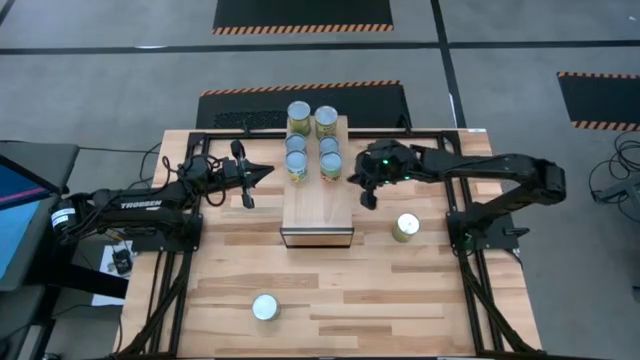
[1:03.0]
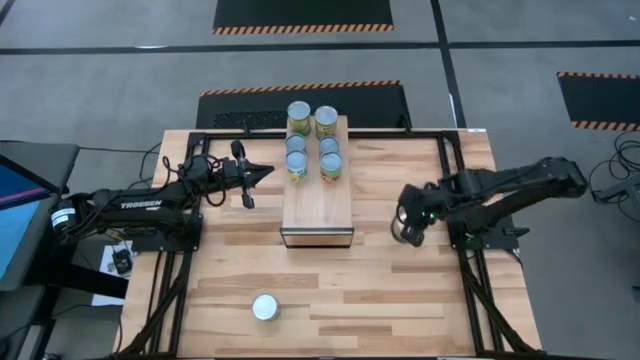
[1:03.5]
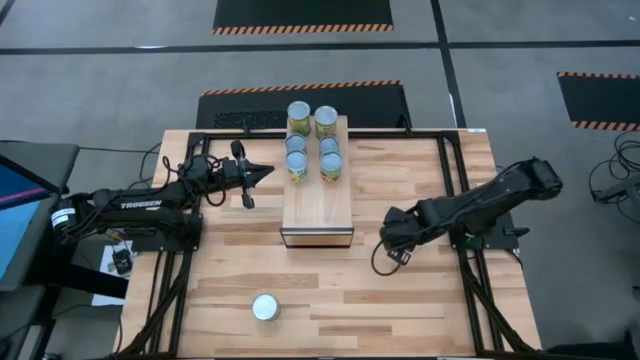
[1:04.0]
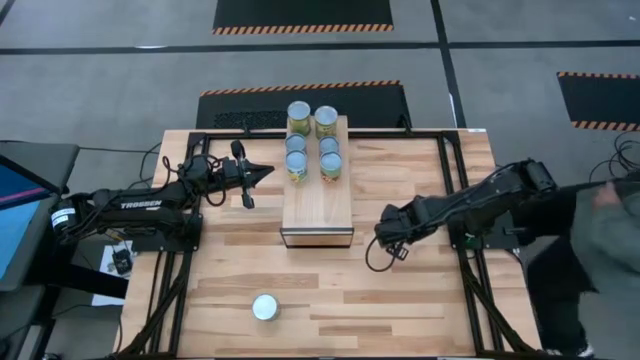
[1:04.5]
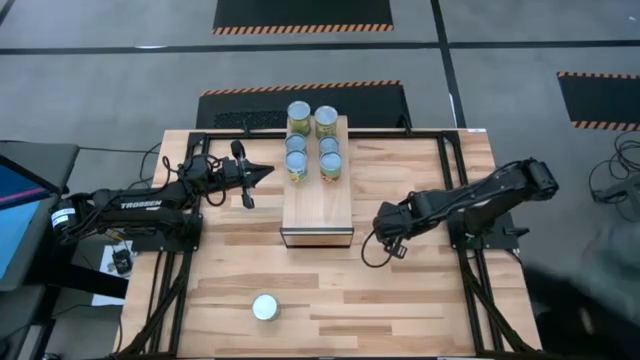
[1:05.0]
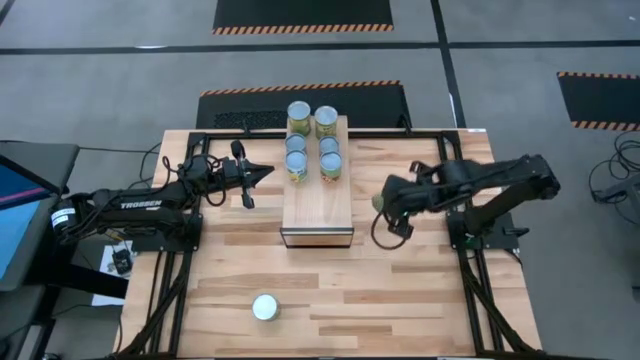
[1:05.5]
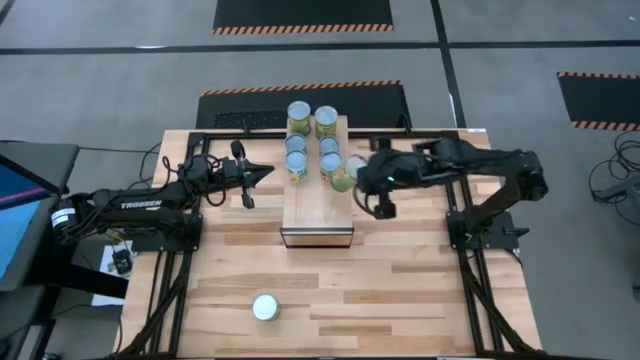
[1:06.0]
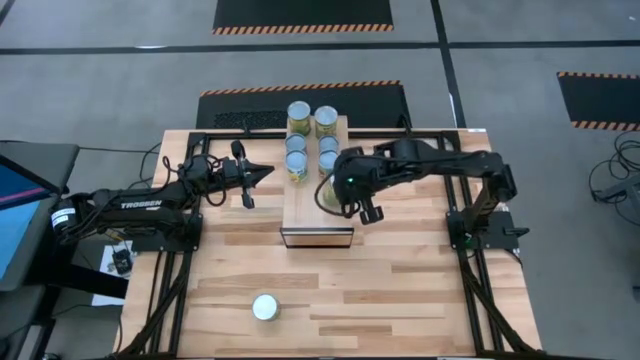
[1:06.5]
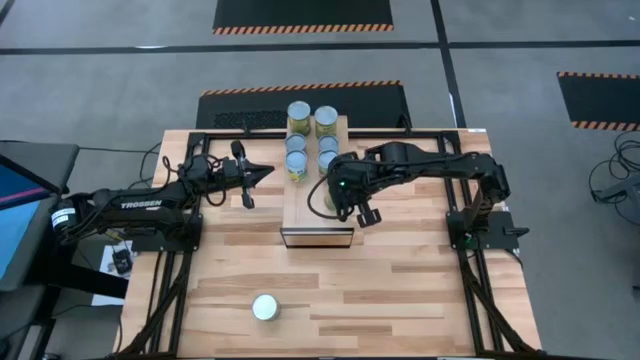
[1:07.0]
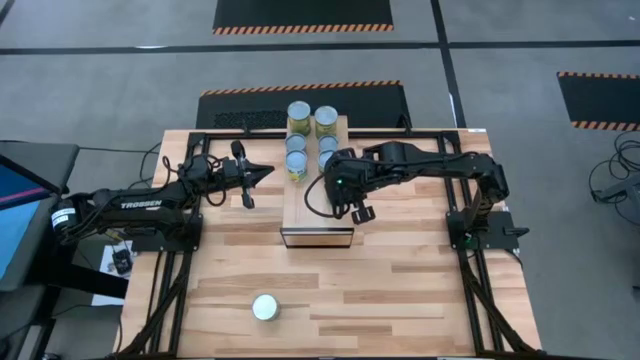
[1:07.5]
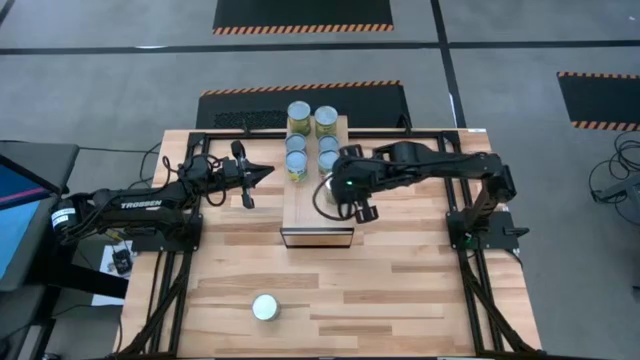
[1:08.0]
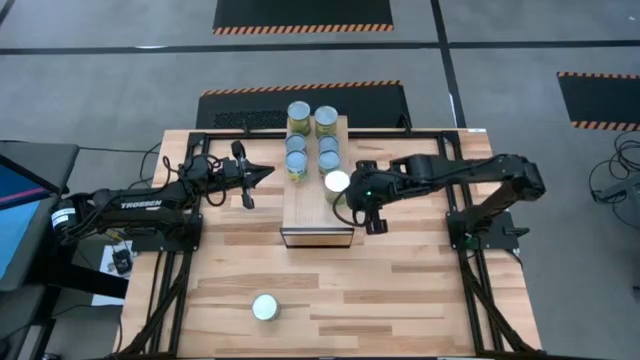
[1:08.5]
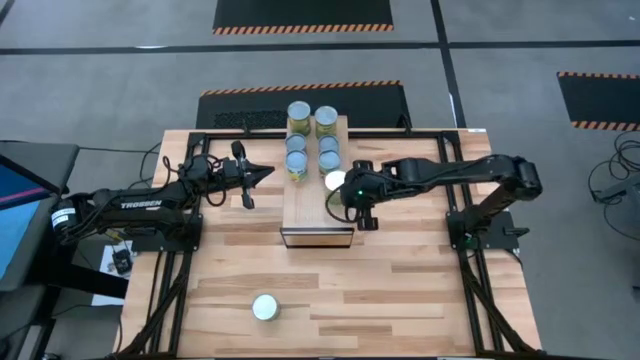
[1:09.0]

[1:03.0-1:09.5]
Task: Pick and place cans onto a shelf
Put the top large canned oranges on the shelf

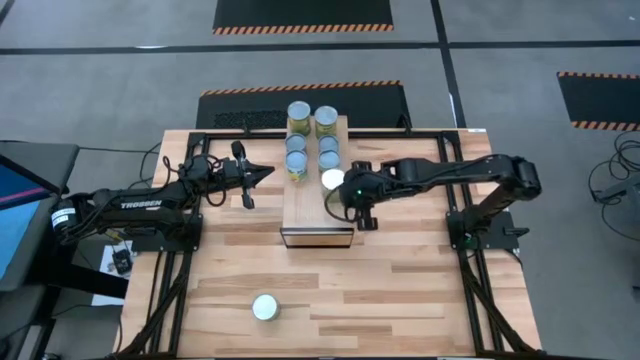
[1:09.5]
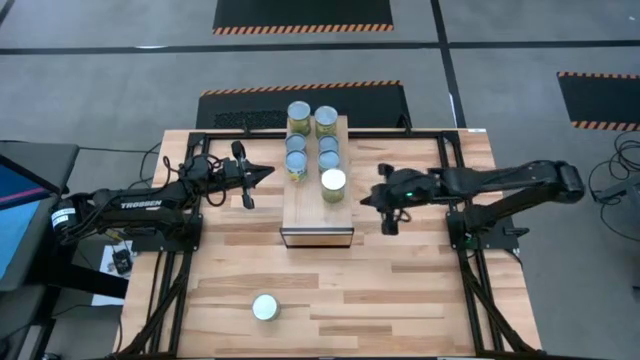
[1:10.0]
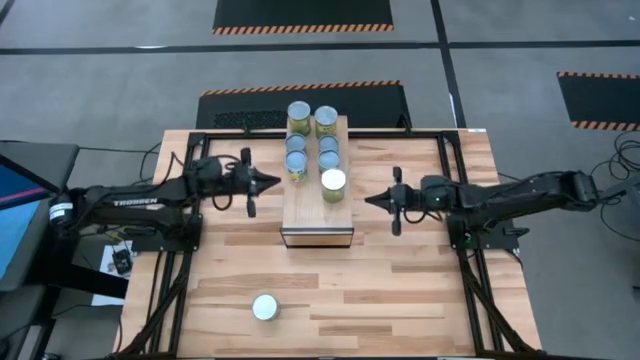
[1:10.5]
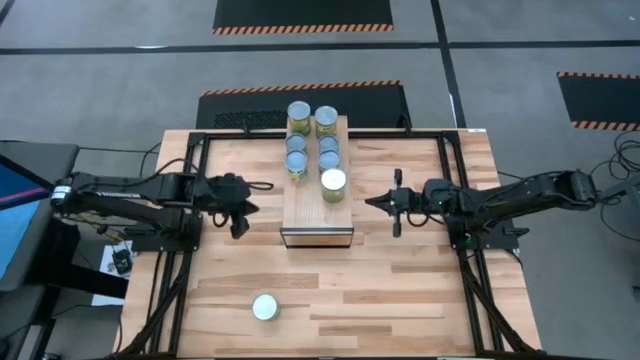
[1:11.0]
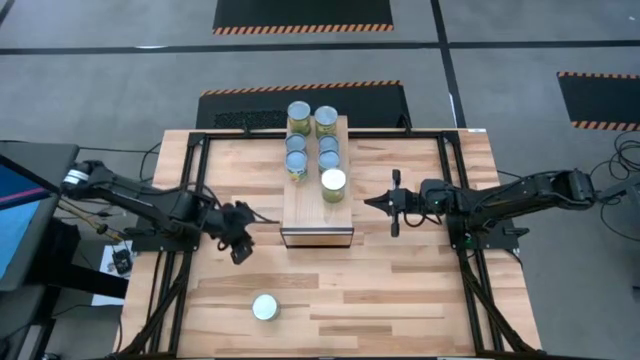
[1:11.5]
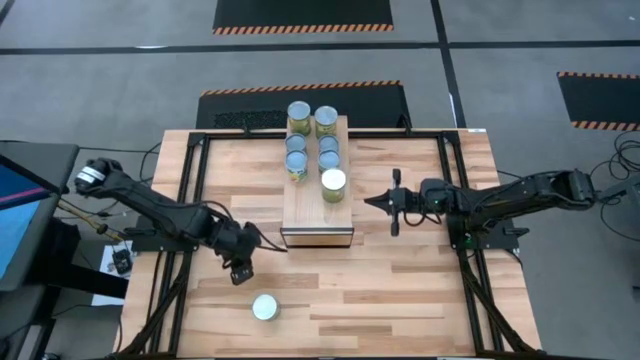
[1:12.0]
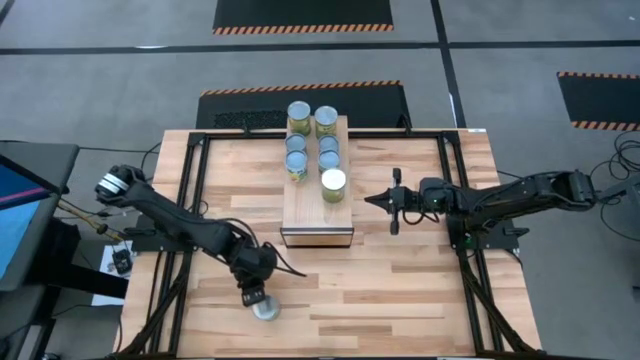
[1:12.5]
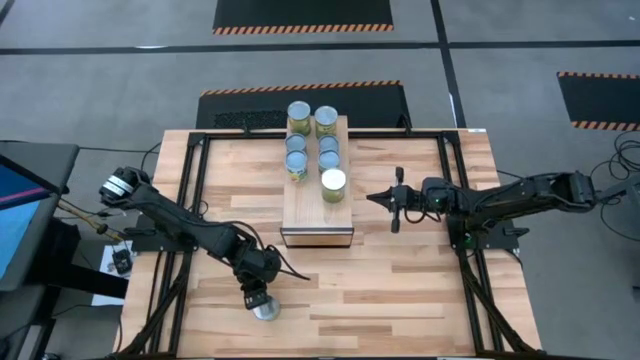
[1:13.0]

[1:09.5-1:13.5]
Put the large canned oranges aligned with the other large canned oranges on the shelf

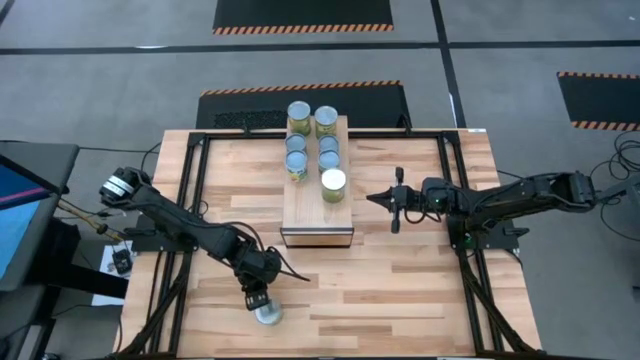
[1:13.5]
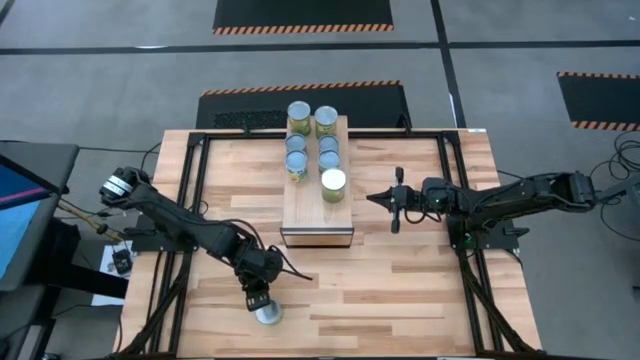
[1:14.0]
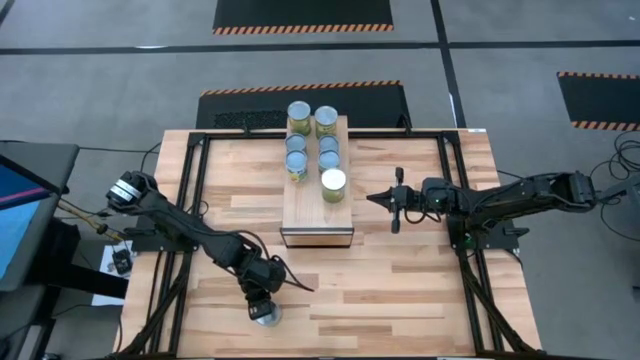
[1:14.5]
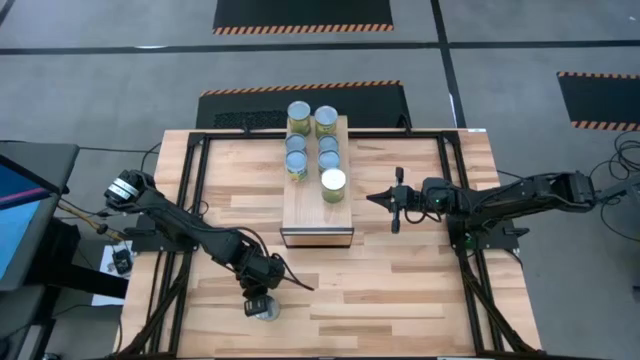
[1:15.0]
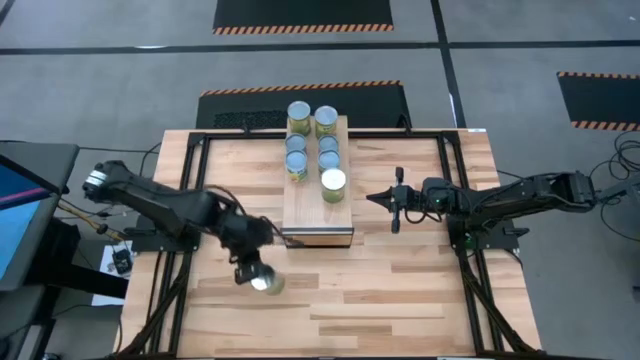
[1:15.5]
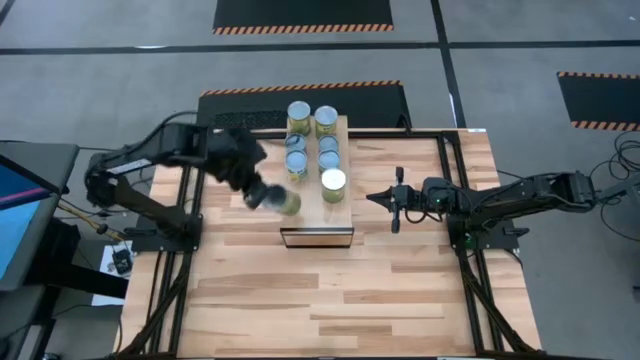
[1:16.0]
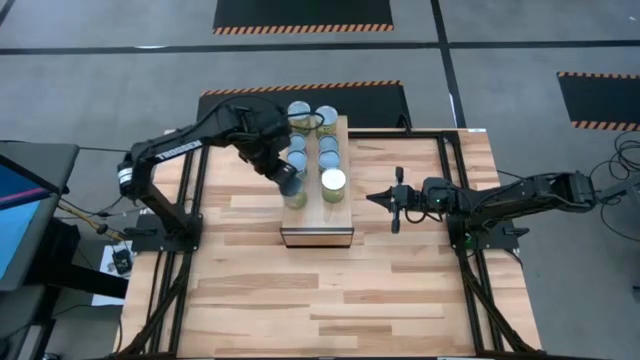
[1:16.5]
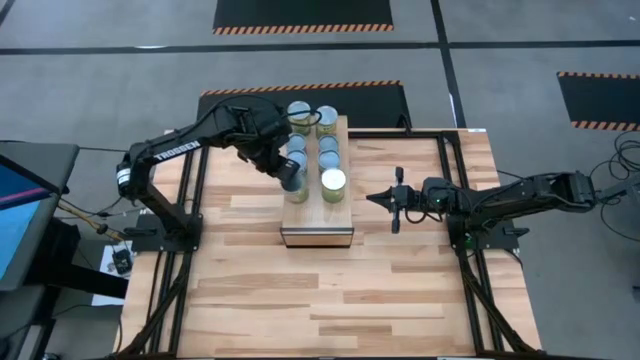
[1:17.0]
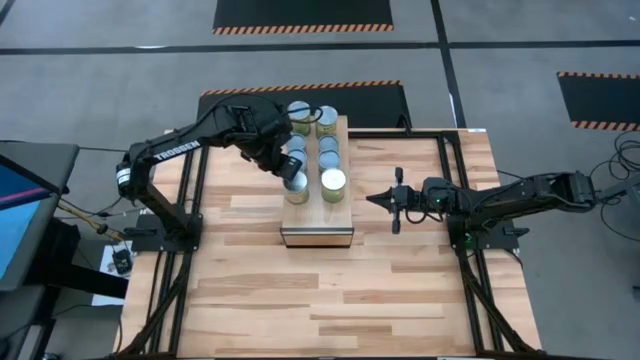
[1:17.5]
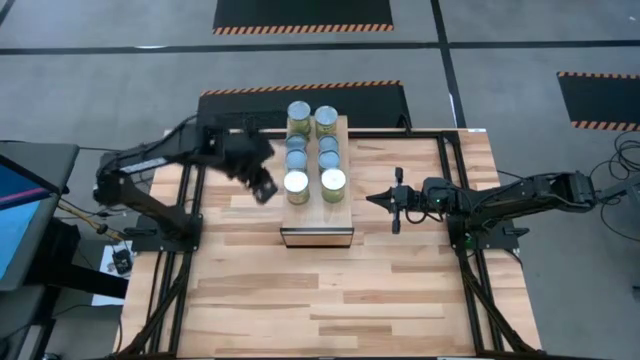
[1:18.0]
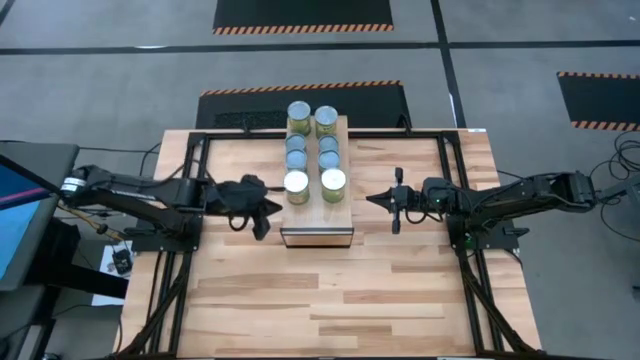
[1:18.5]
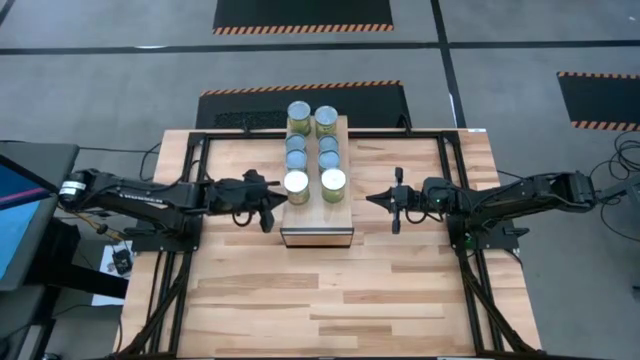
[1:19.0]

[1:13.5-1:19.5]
Put the large canned oranges aligned with the other large canned oranges on the shelf

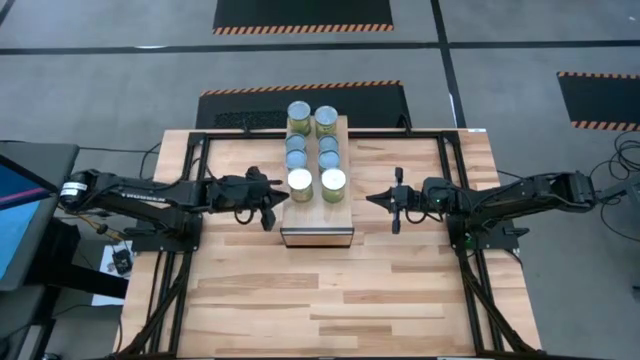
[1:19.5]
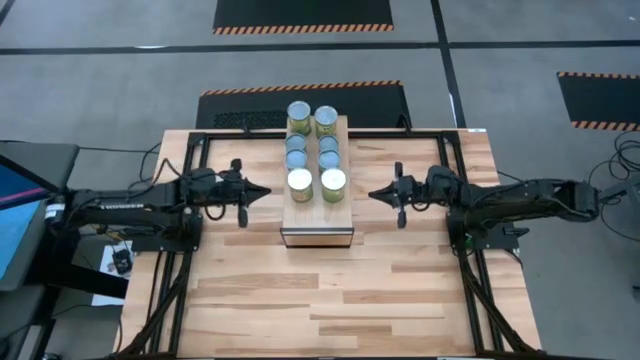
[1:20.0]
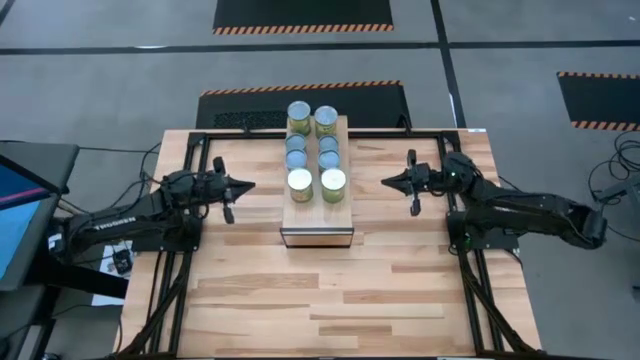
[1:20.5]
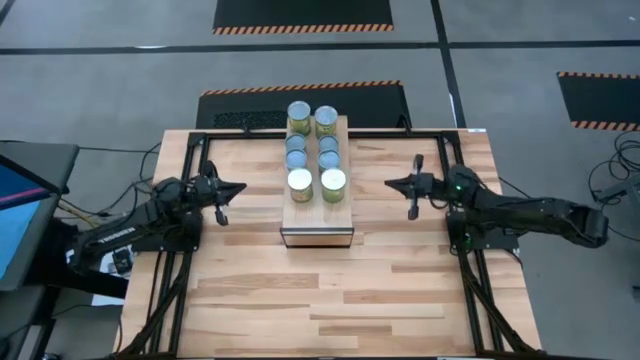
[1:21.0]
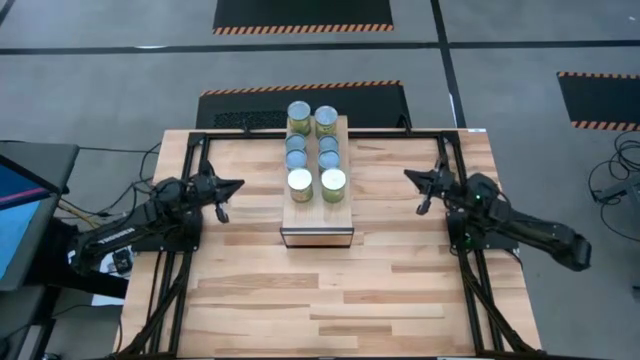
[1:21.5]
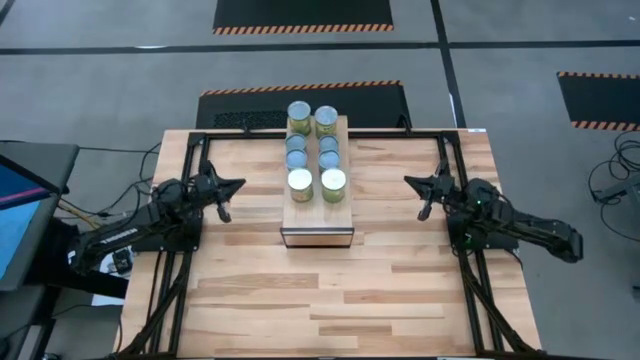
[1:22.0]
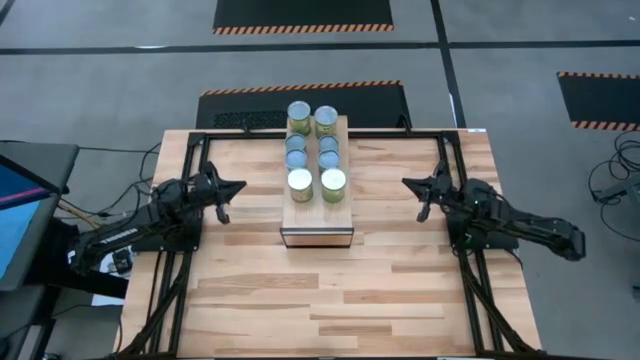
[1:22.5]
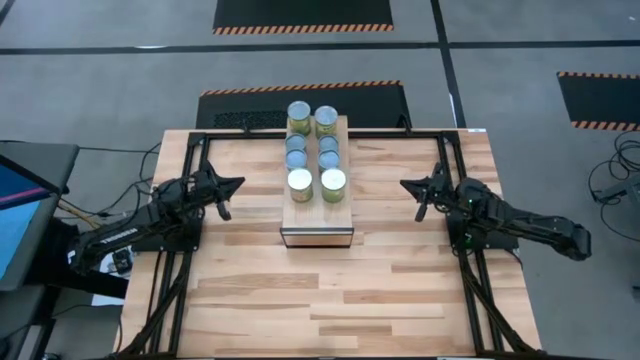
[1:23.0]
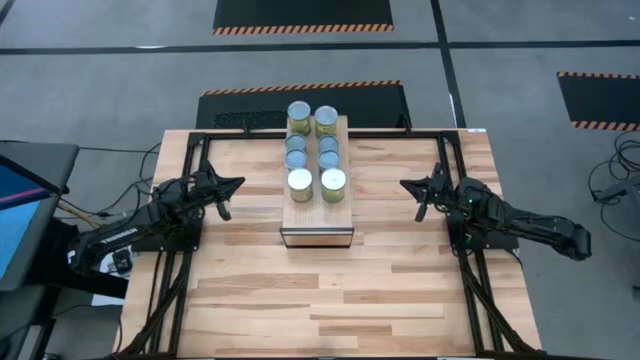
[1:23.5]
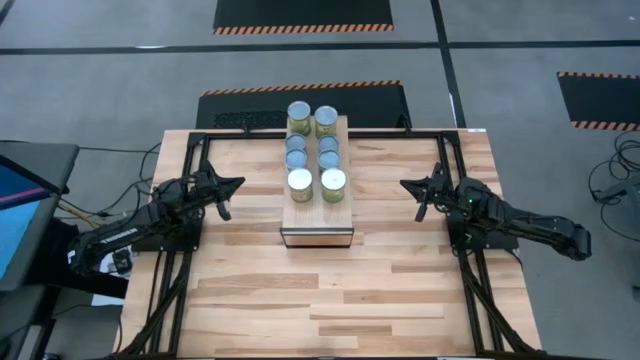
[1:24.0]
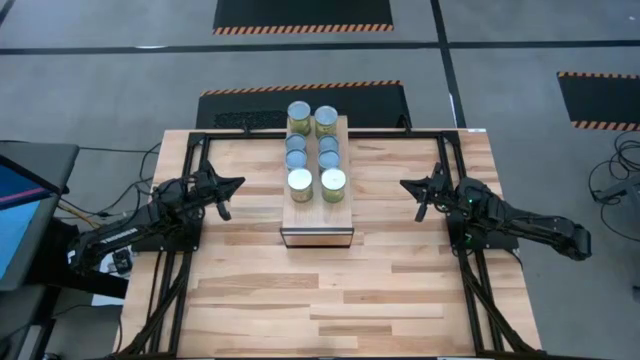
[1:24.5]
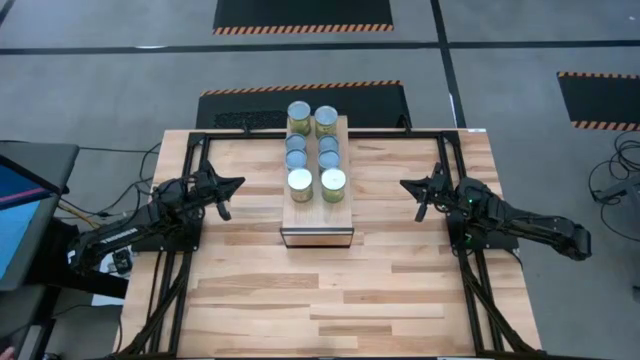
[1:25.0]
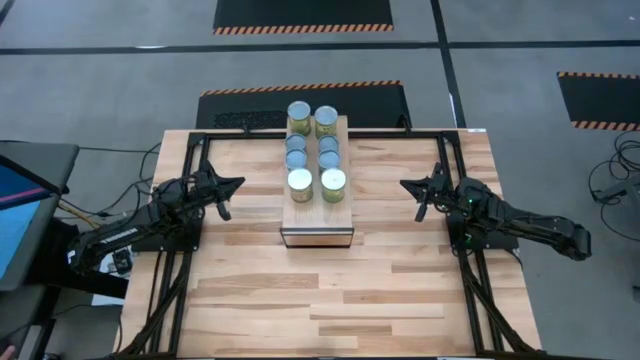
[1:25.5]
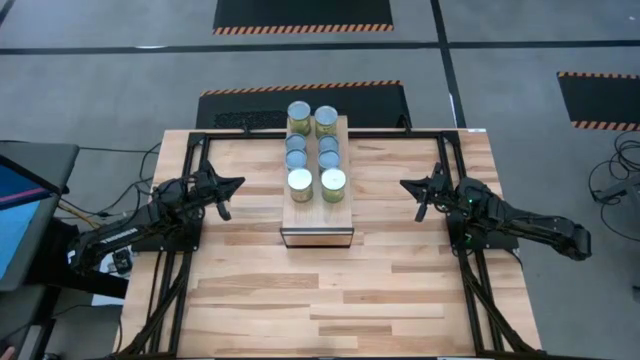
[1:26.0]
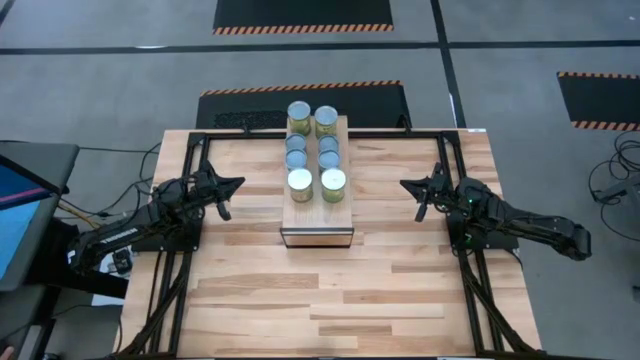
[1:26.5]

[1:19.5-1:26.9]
Return to Home Position
